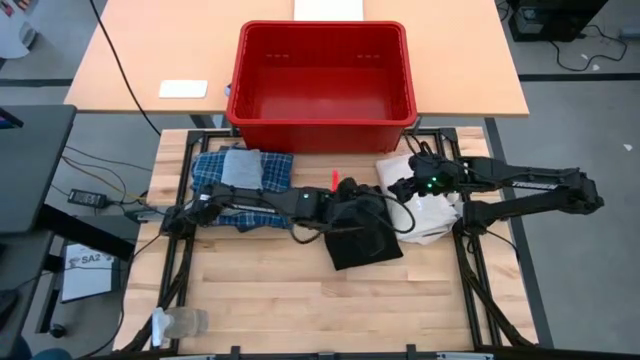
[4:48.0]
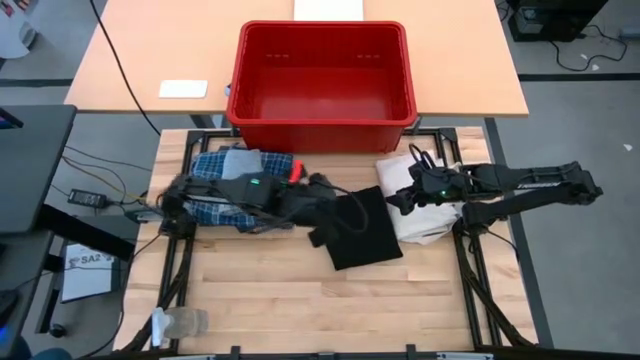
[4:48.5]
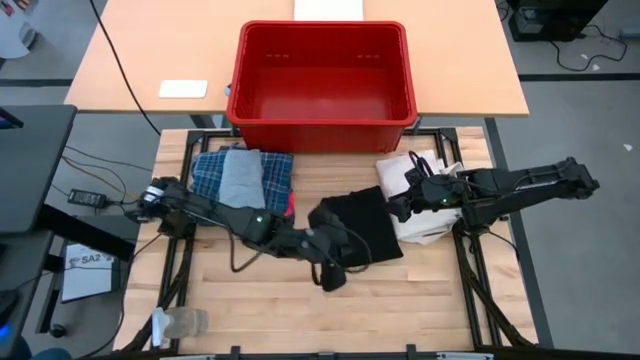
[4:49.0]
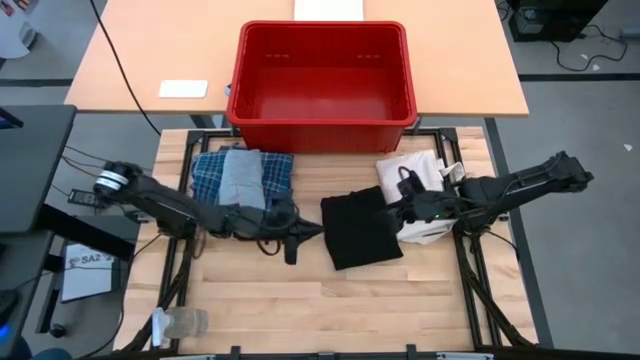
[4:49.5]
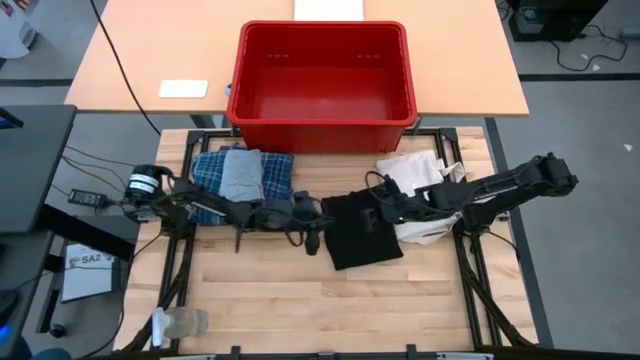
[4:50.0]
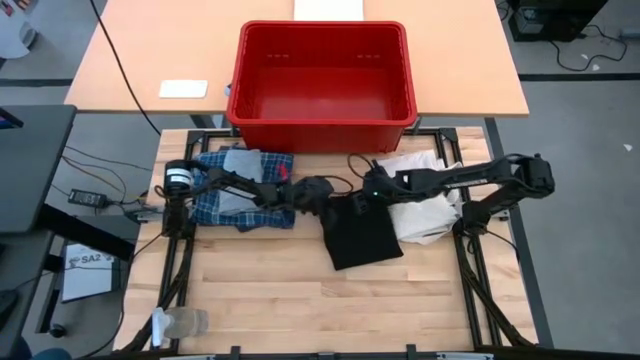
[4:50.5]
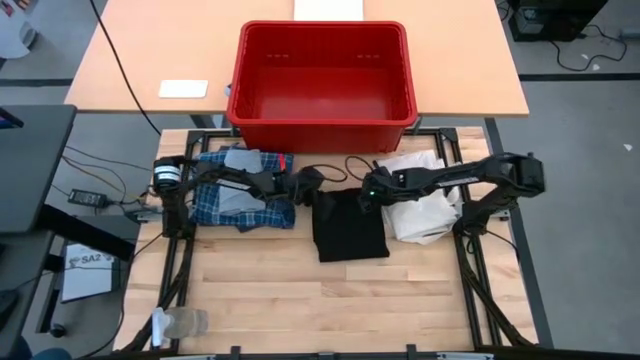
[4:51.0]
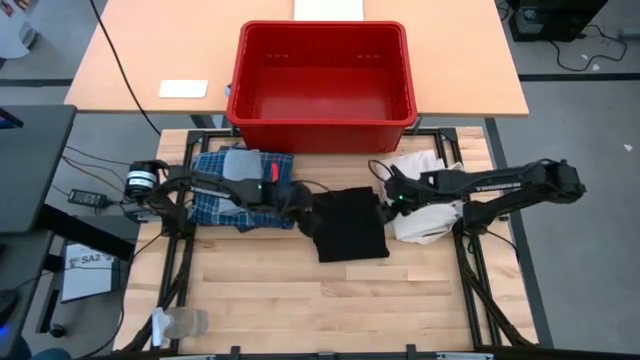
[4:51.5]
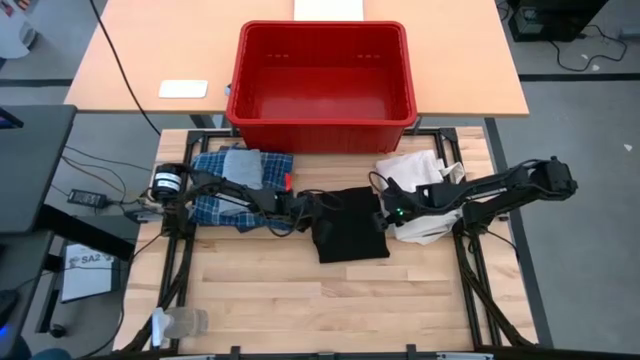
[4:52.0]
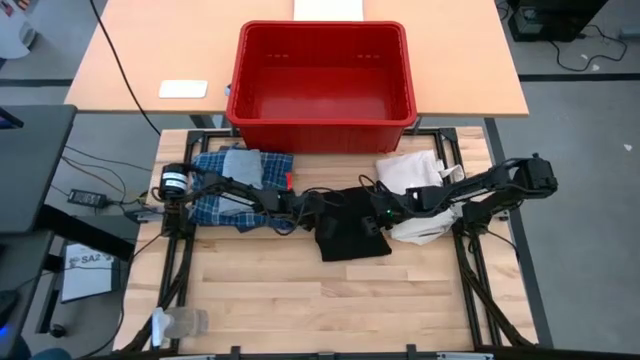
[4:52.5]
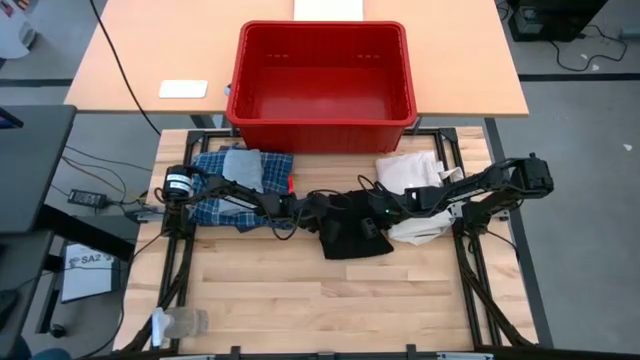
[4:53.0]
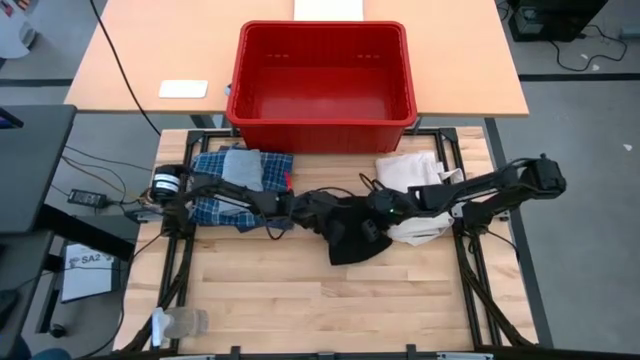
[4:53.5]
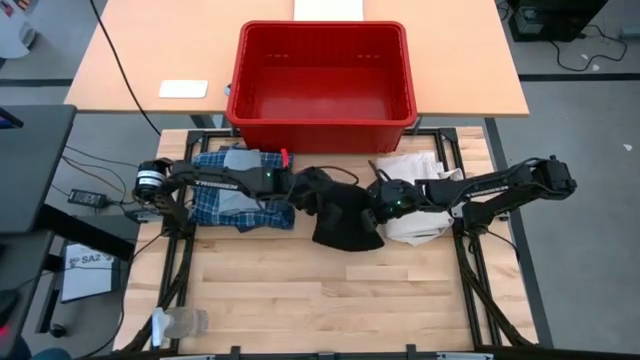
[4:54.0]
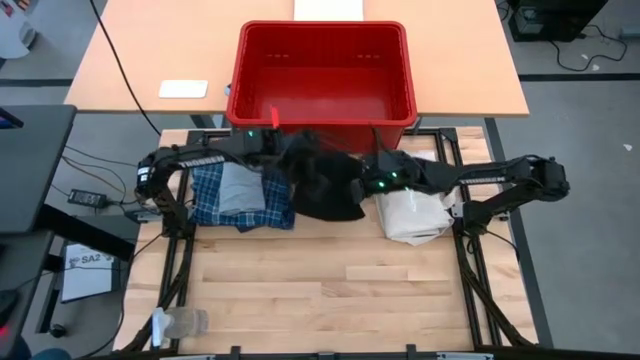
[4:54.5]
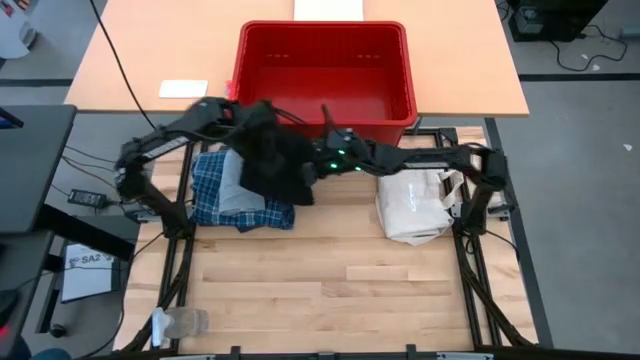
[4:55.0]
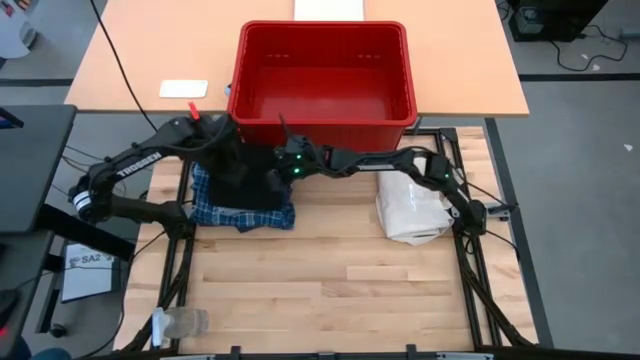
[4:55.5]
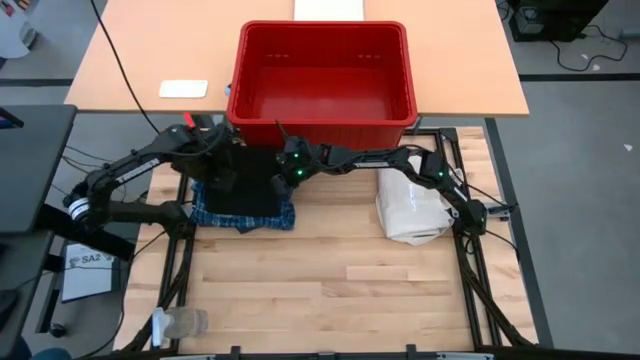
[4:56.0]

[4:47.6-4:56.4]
Task: Fold Laundry from Bin
Stack the black shirt on top of the gray shirt

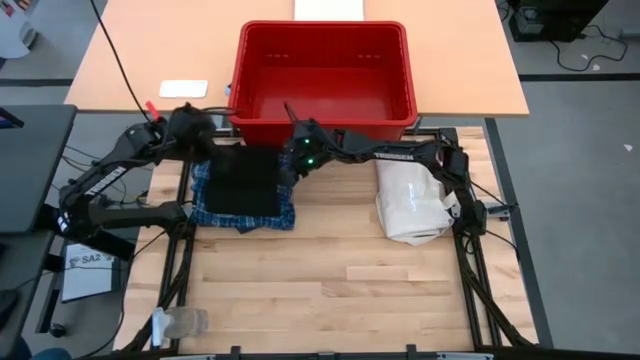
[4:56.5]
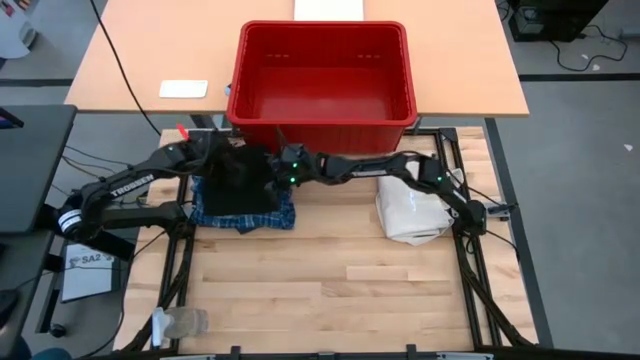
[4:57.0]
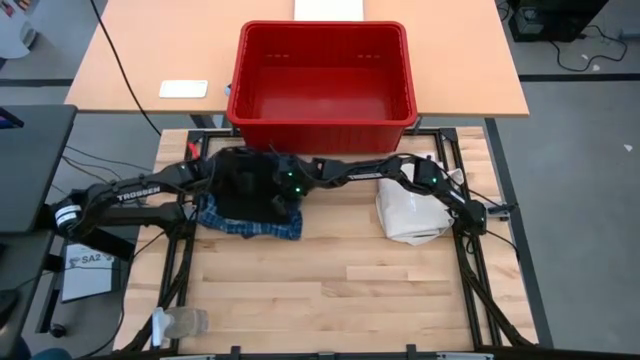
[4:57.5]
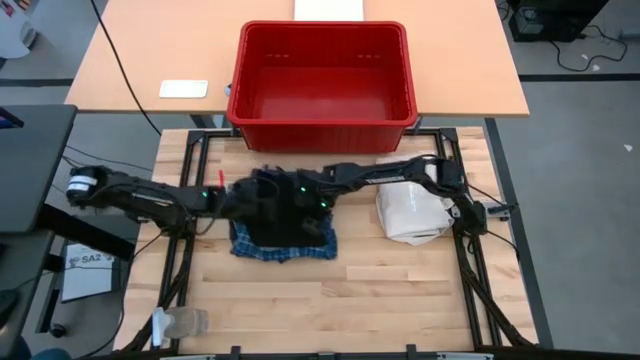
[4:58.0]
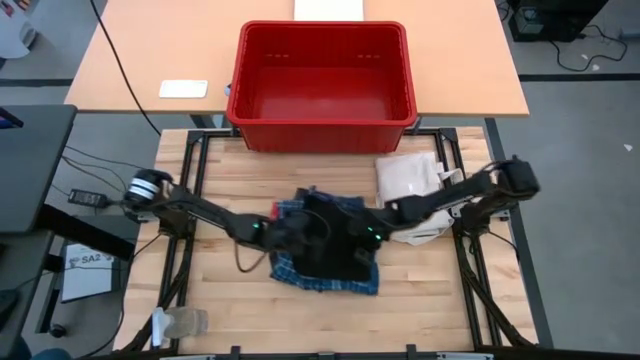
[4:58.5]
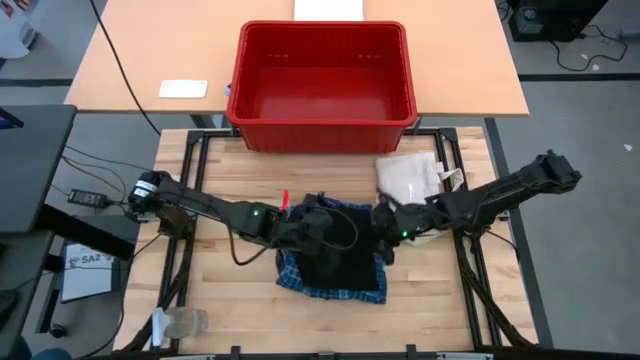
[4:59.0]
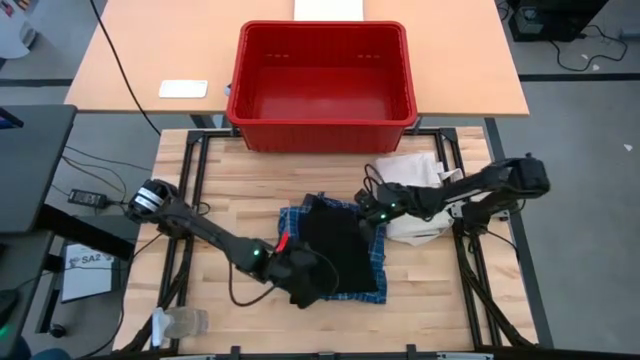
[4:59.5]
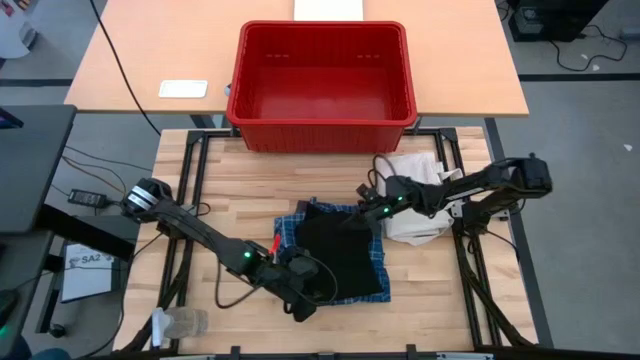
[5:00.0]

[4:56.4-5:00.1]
Move the stack of folded laundry to the center of the table

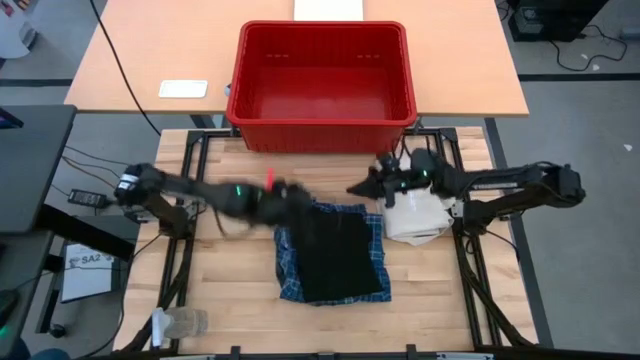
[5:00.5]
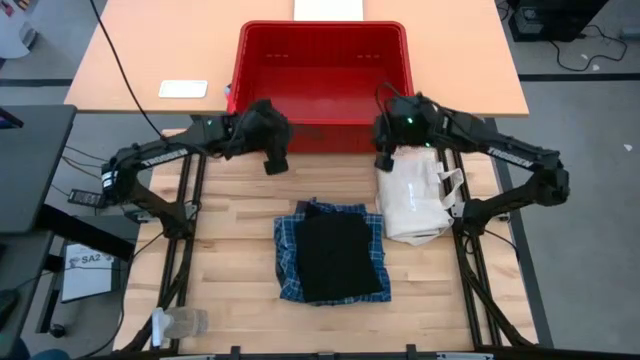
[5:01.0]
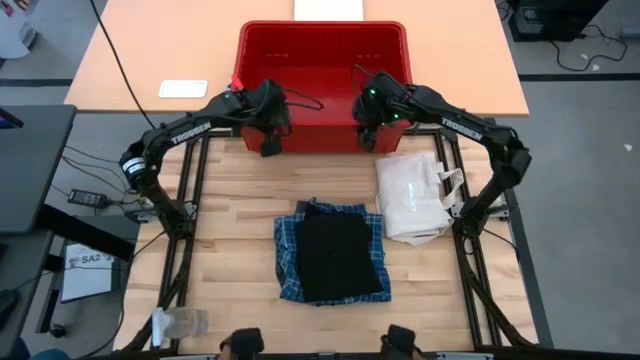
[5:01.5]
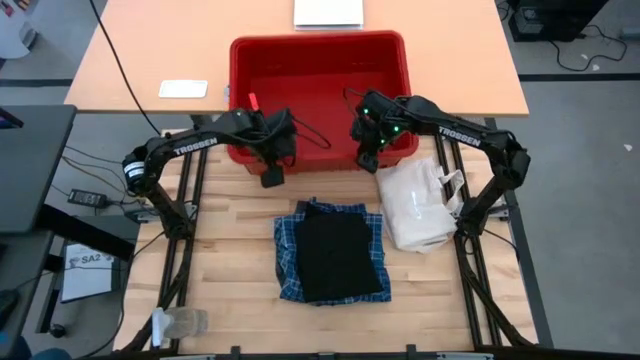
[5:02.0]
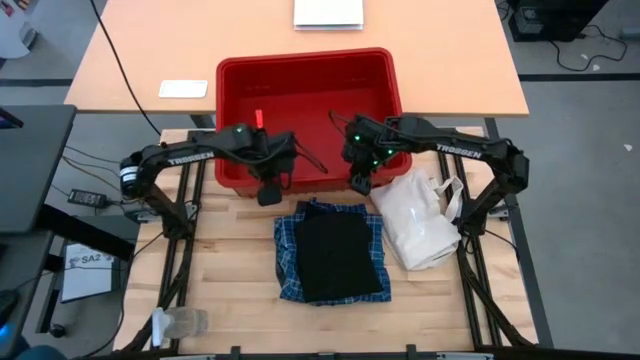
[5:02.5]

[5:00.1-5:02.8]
Adjust the laundry bin

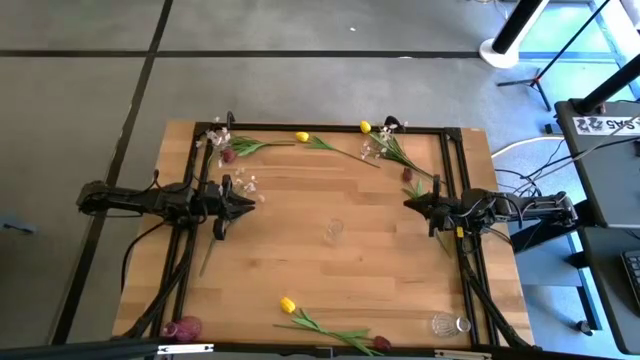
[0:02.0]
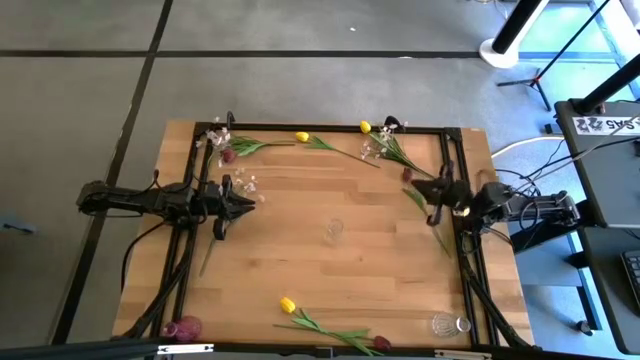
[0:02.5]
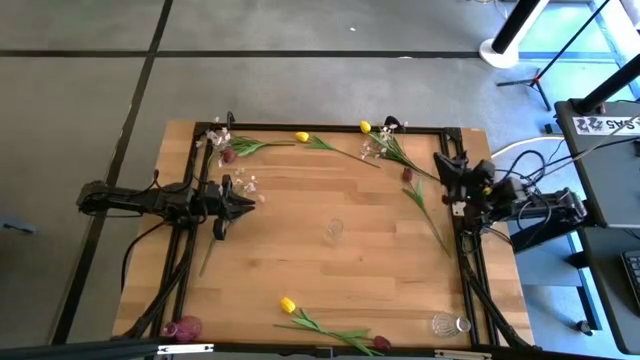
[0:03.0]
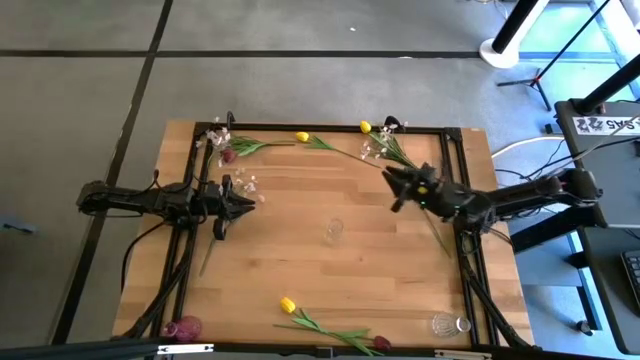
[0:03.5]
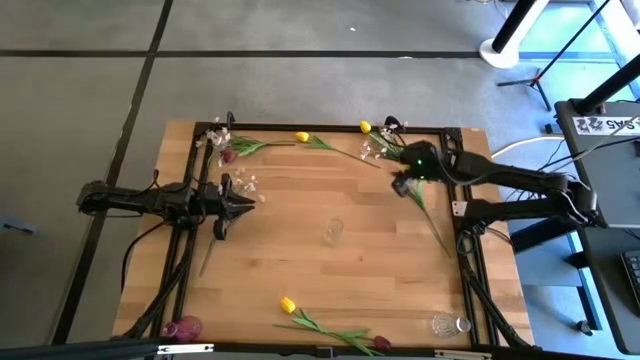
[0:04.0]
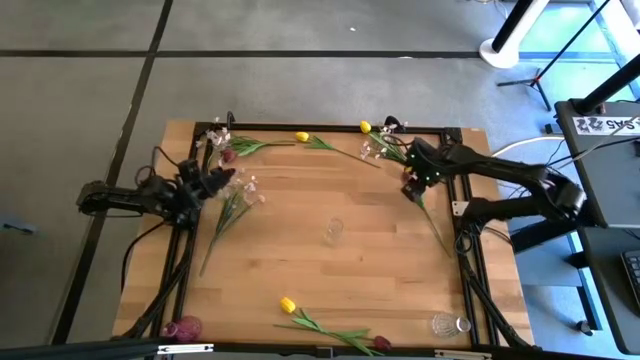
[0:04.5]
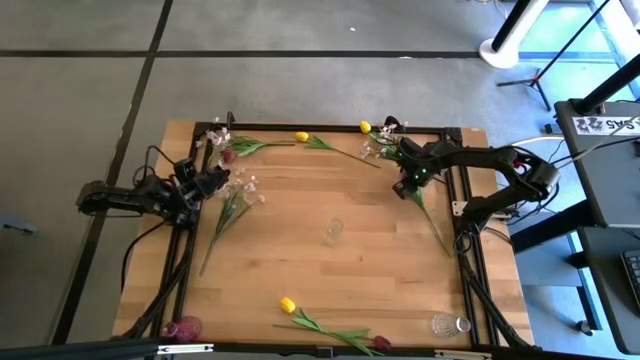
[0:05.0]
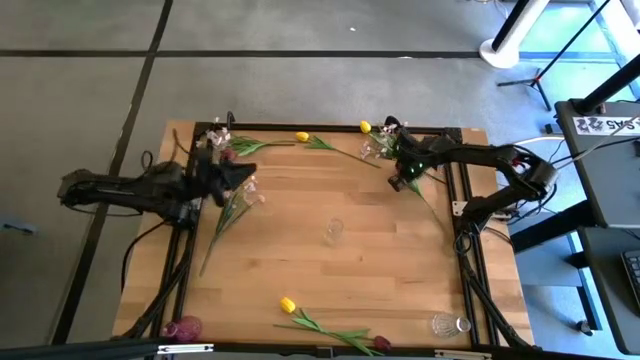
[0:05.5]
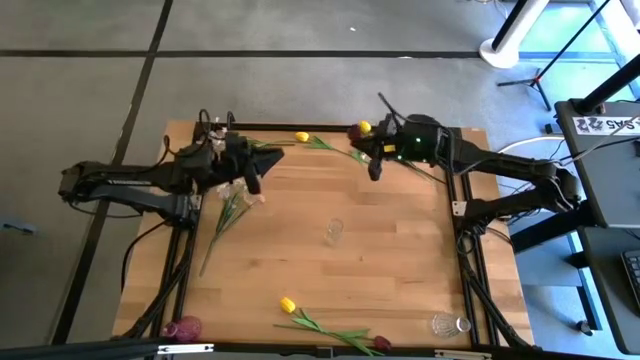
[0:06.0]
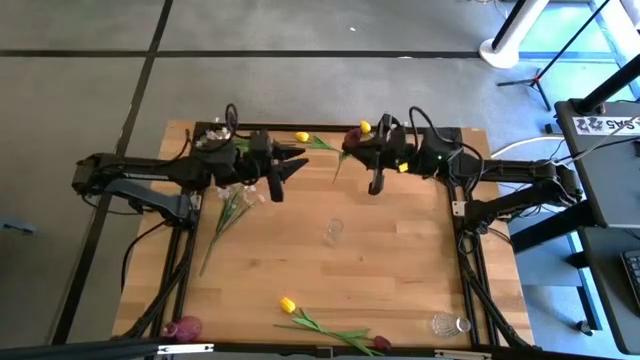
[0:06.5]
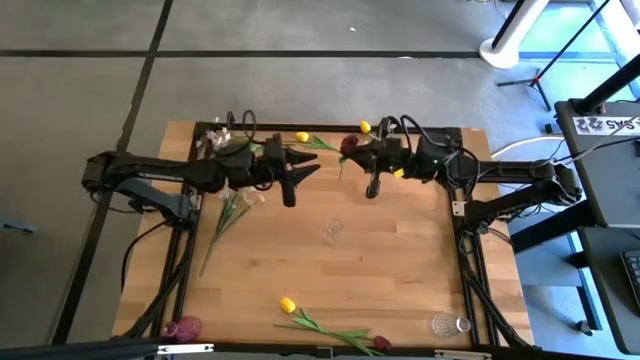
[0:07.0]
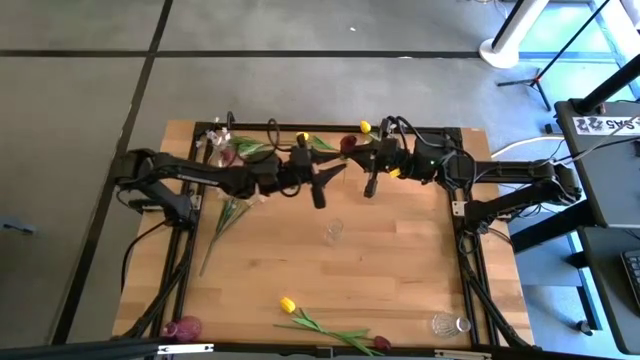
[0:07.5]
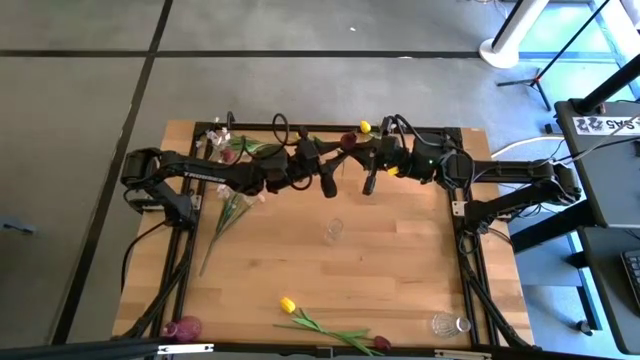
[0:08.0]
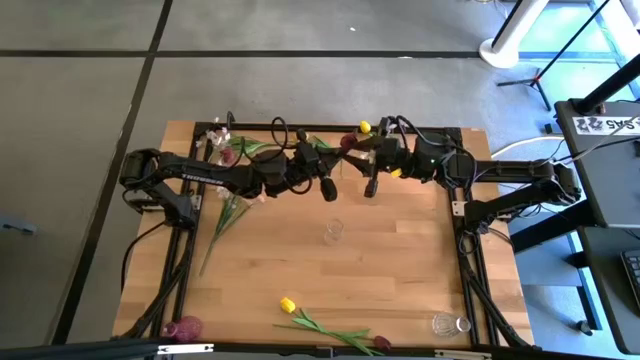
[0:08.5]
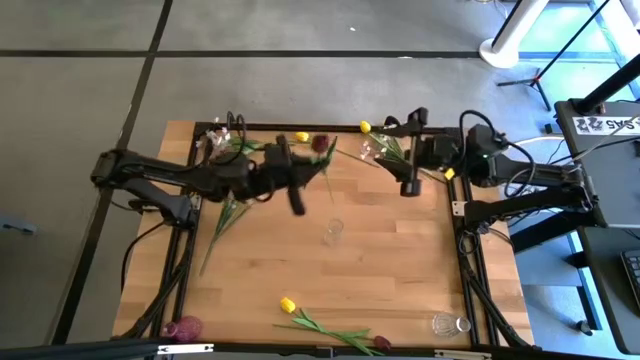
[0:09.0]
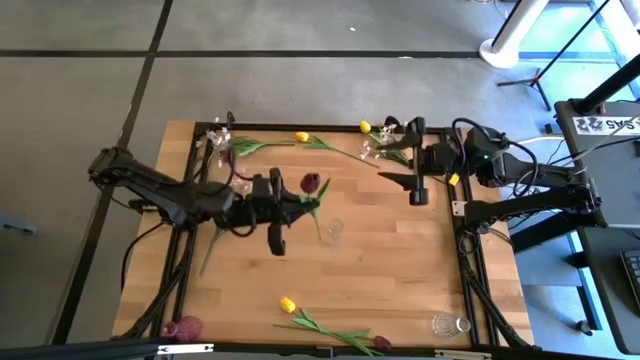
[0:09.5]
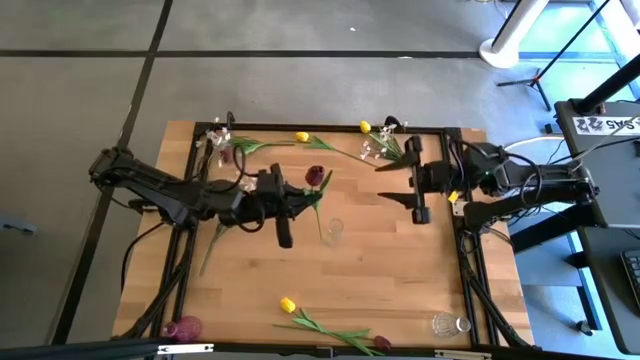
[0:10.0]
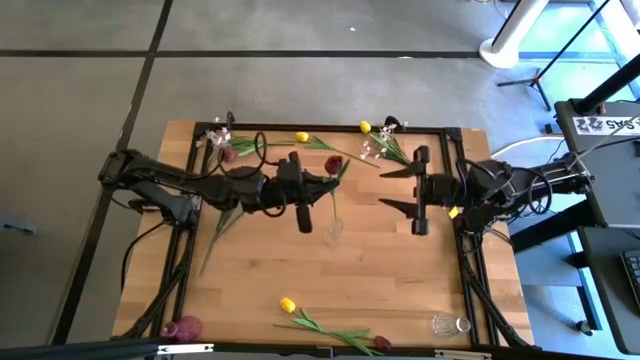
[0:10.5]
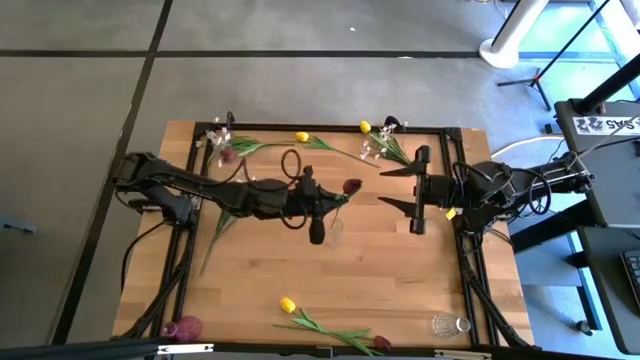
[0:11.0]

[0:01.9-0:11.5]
Task: Sort flowers into vase by color
Put the top right red tulip into the top transparent vase
